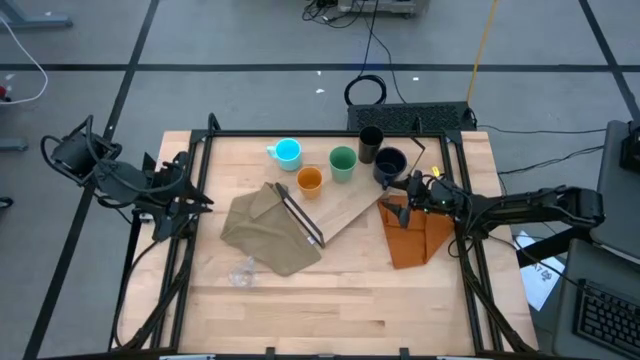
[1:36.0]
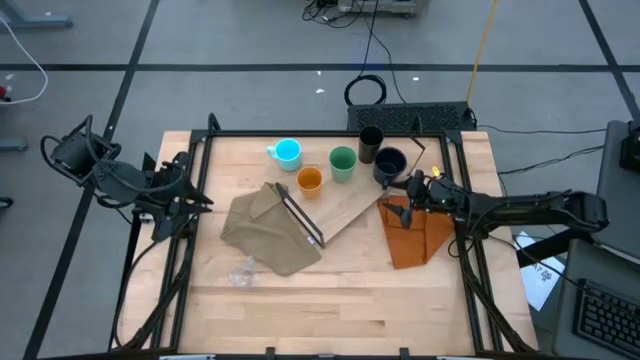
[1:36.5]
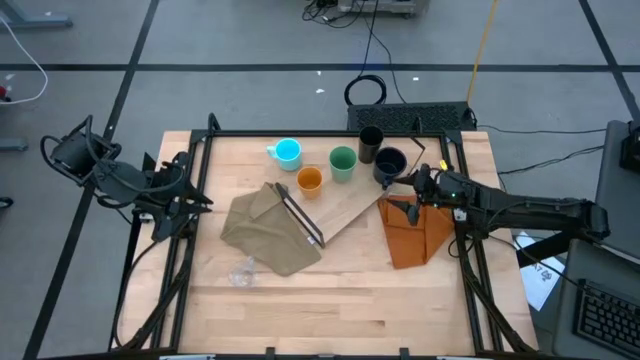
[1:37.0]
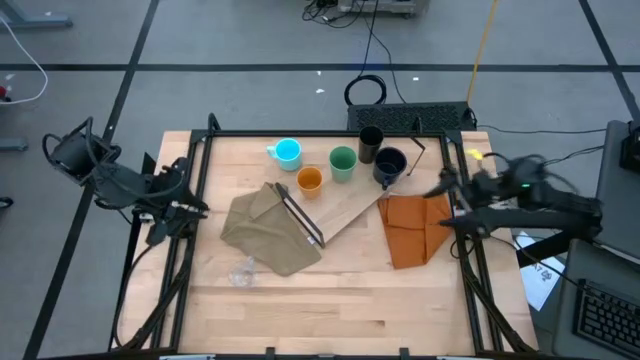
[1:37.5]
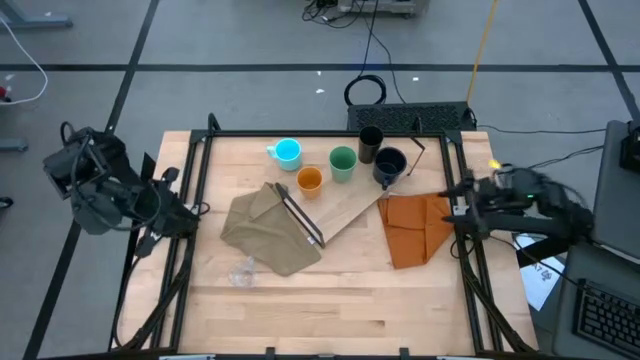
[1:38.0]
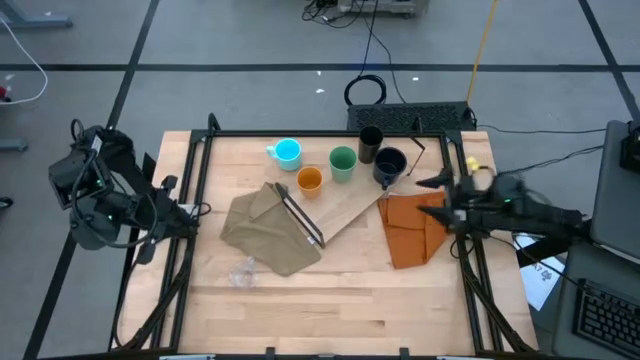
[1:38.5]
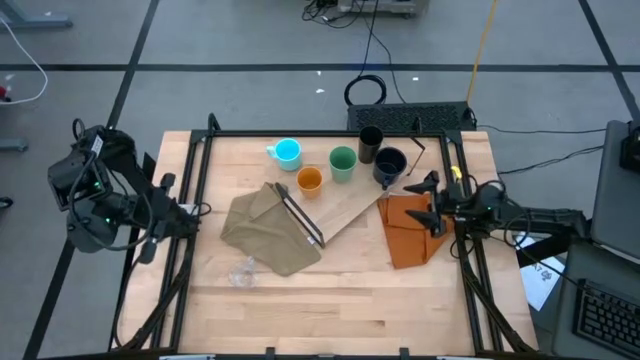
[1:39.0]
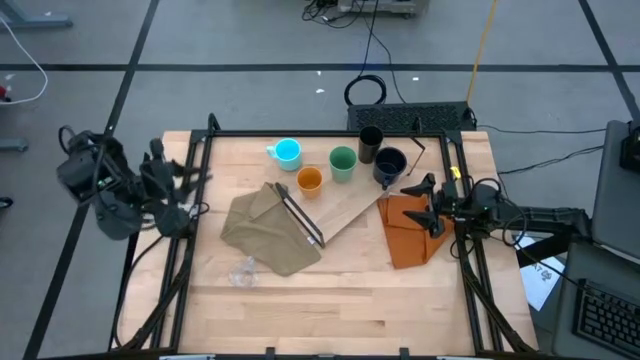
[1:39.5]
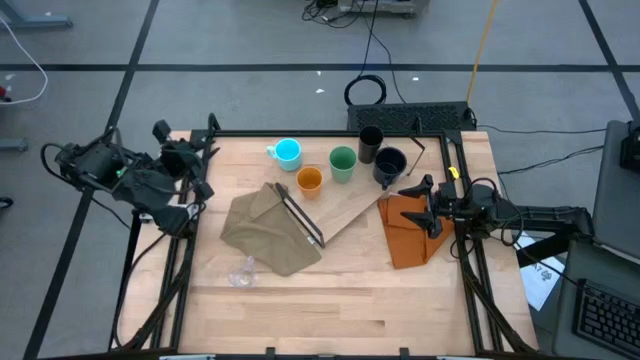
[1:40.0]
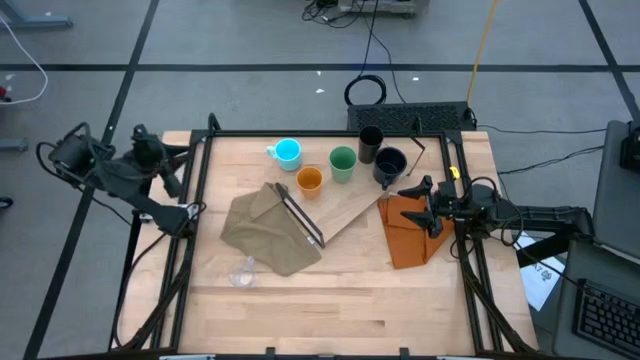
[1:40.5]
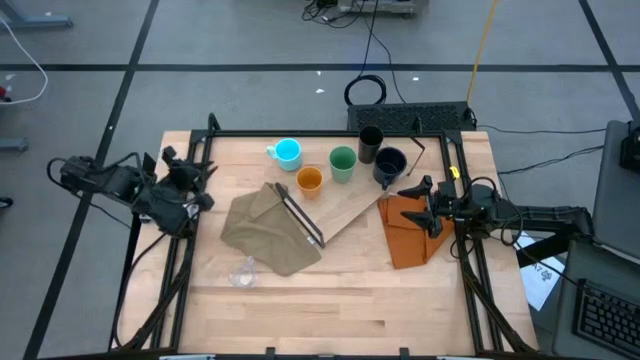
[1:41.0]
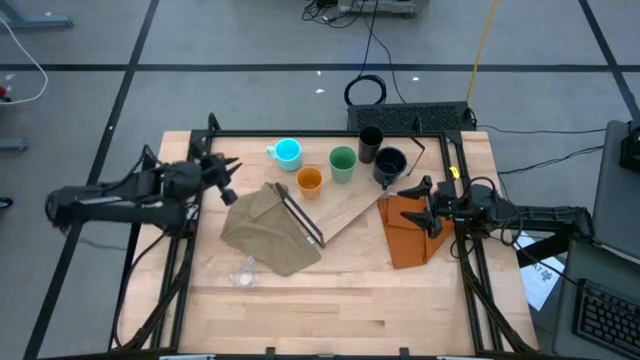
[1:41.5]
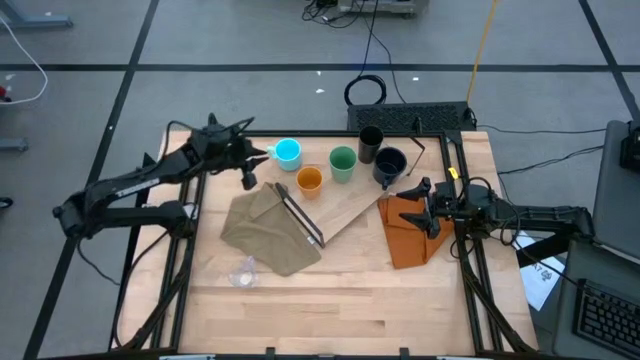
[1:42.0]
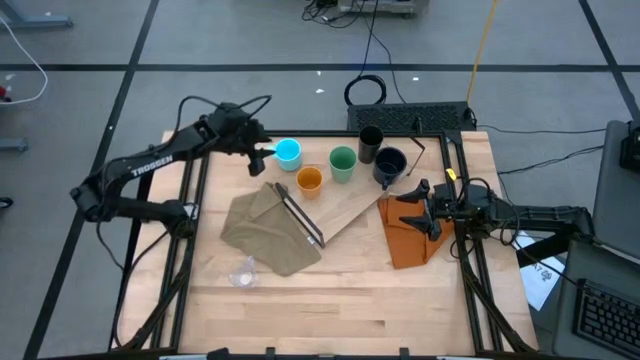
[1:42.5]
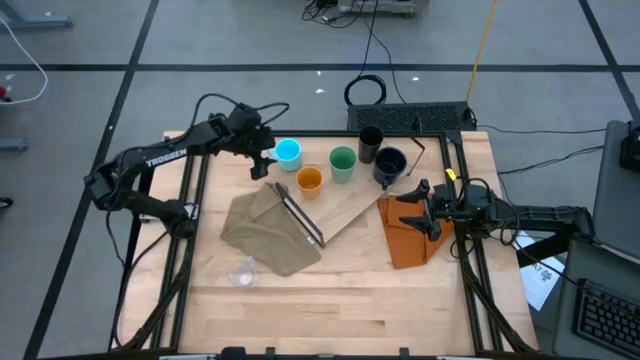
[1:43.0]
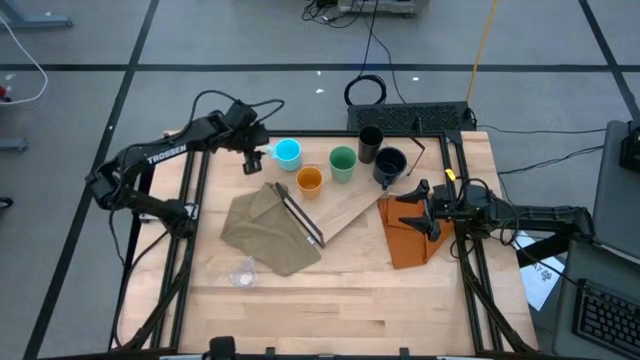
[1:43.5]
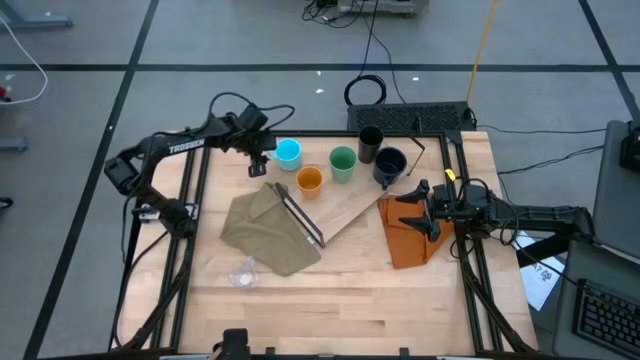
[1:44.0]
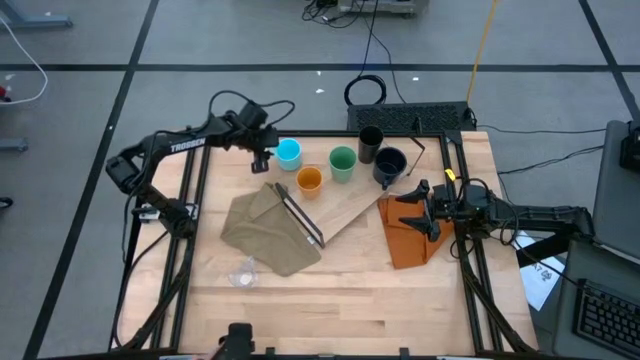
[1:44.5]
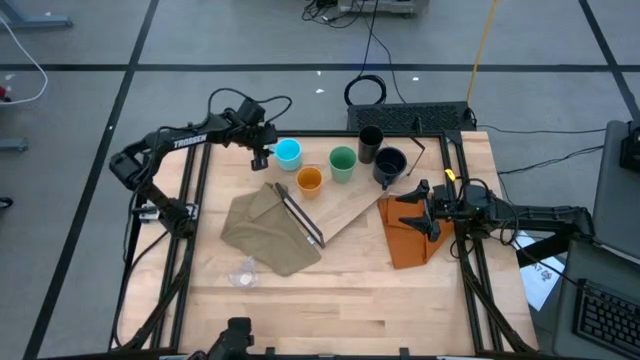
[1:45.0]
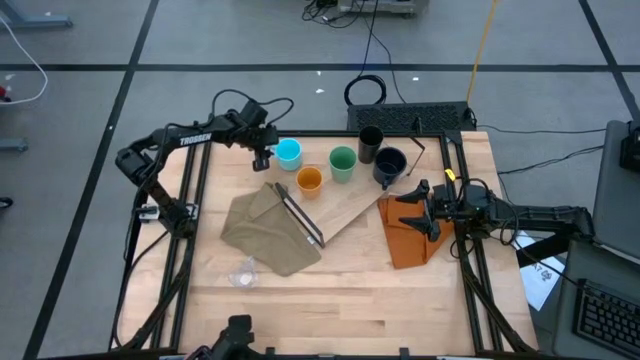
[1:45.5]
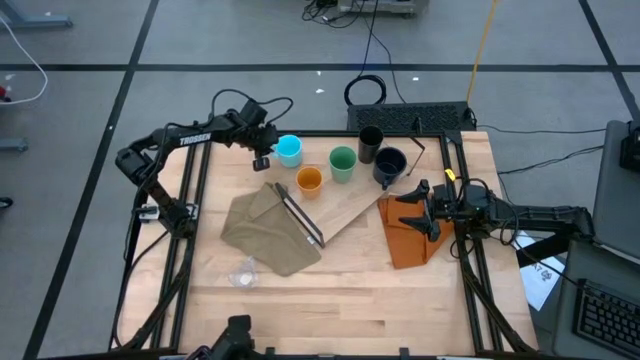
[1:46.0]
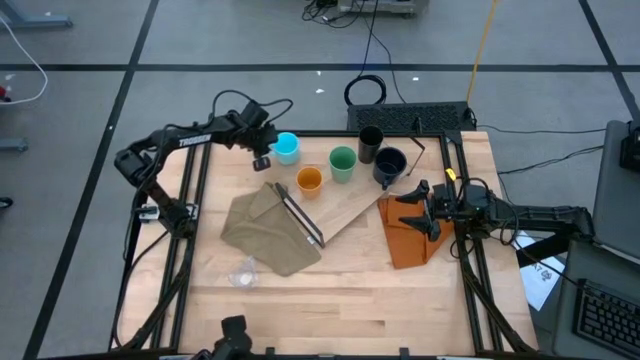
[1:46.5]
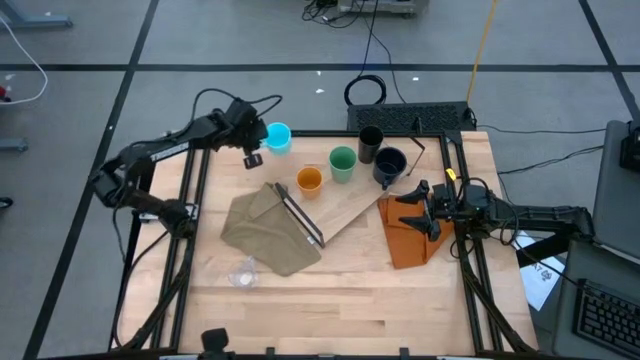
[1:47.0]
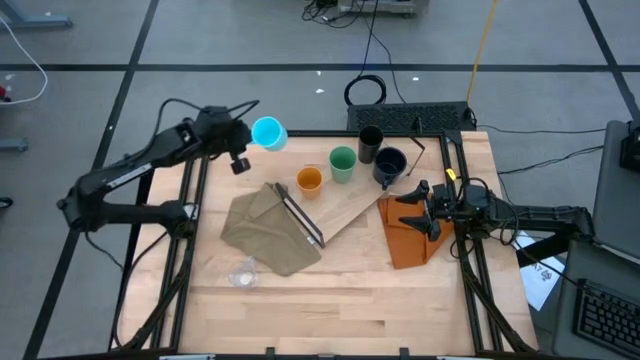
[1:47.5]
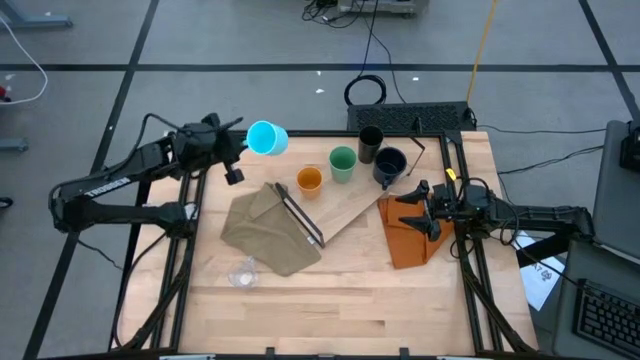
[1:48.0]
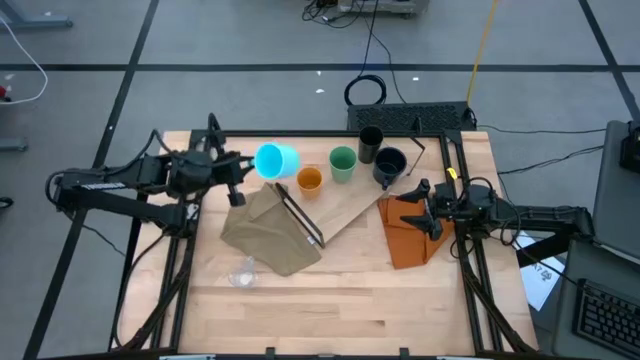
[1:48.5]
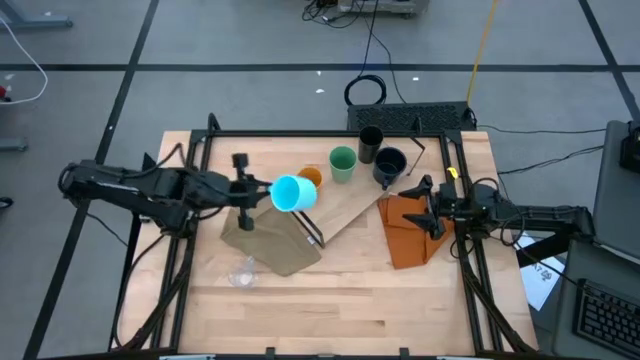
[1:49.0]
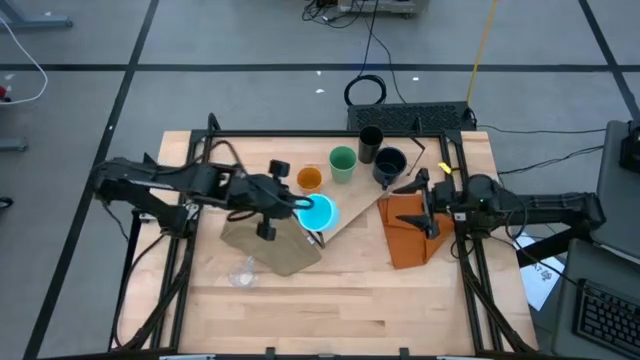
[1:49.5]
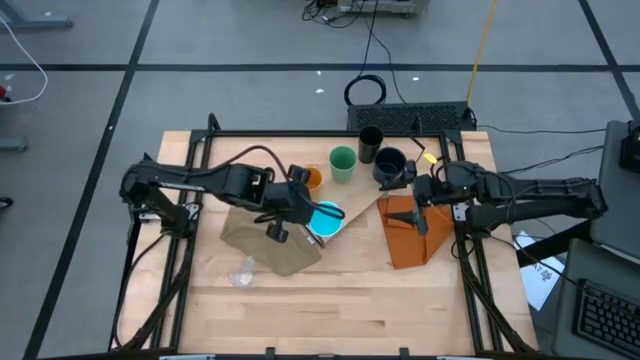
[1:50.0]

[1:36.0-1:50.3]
Task: Stack small to large cups/mugs on shelf
Put the light blue mug on the shelf

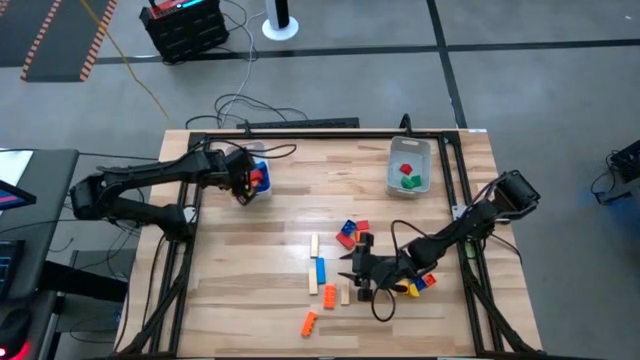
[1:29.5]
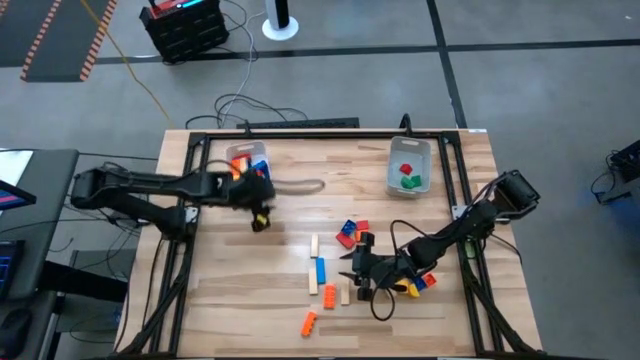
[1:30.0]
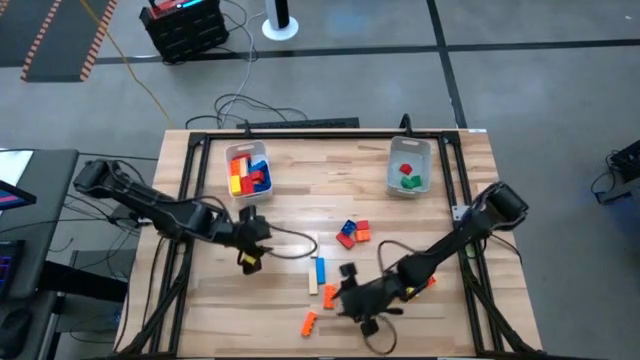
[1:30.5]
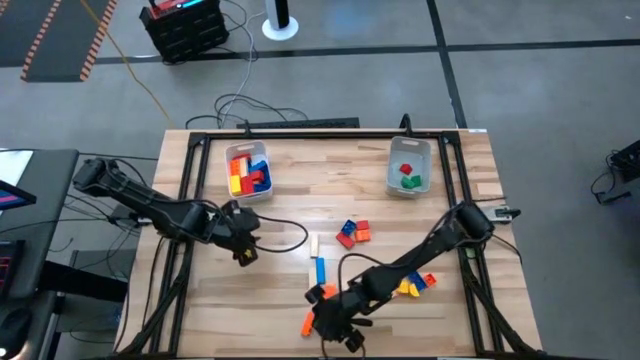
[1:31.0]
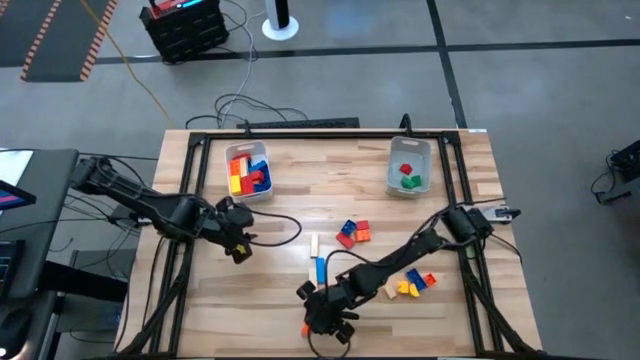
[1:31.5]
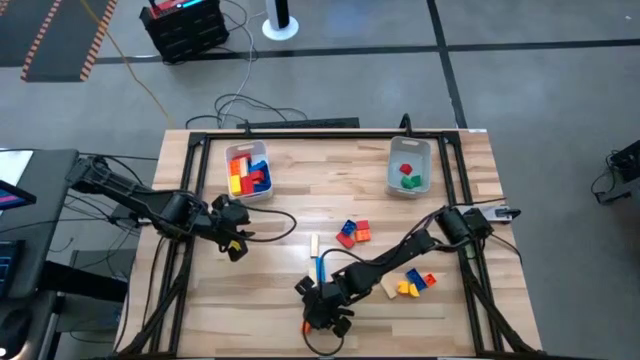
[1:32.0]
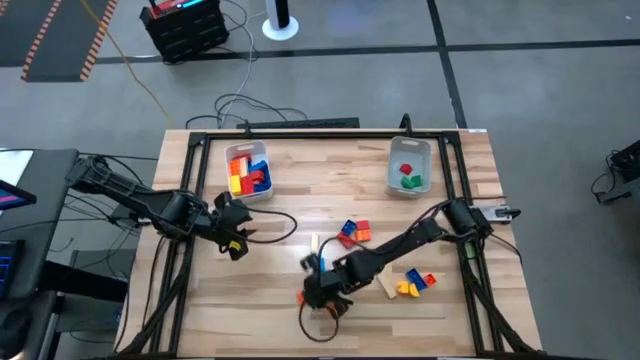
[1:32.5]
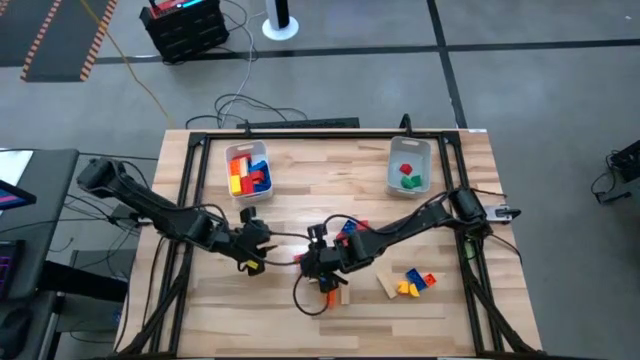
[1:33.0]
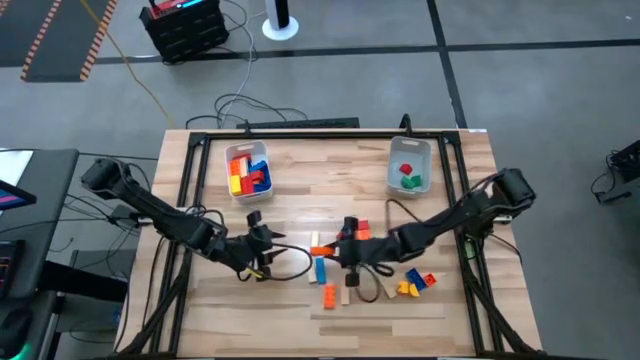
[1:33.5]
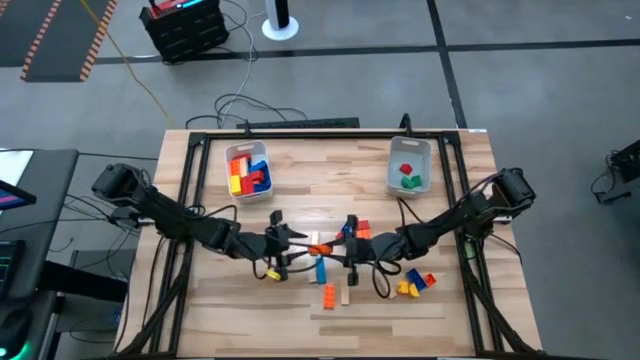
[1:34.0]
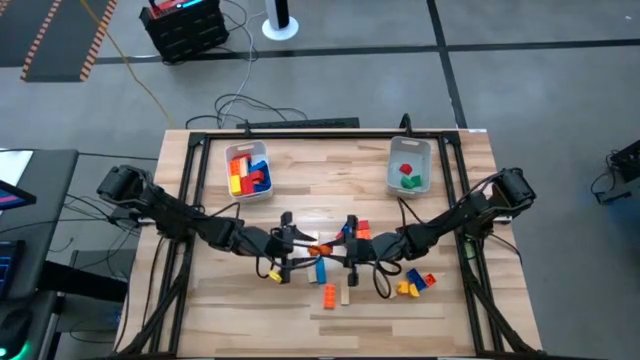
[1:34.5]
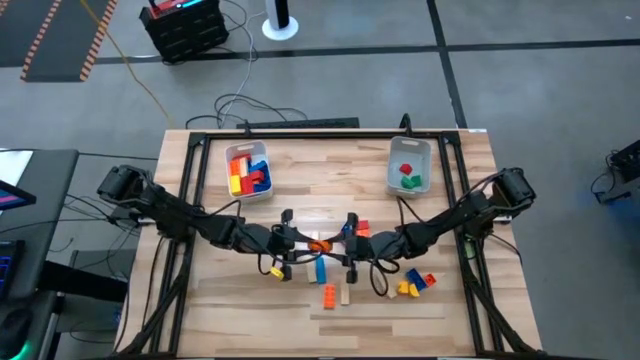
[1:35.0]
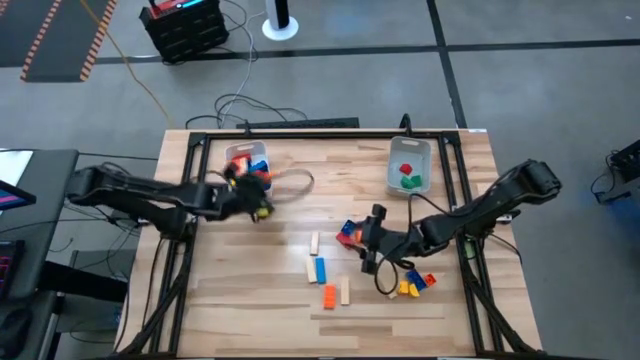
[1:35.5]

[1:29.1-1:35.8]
Task: Sort blocks by size
Put the large orange game piece into the white bin

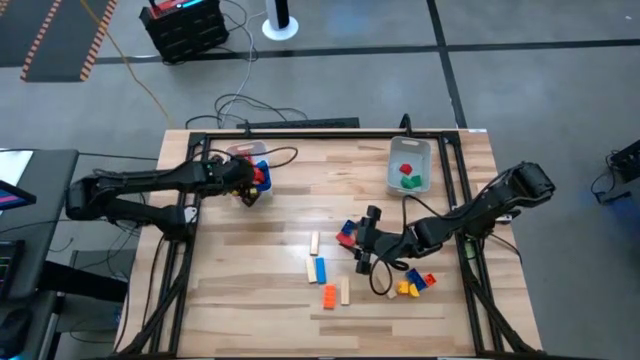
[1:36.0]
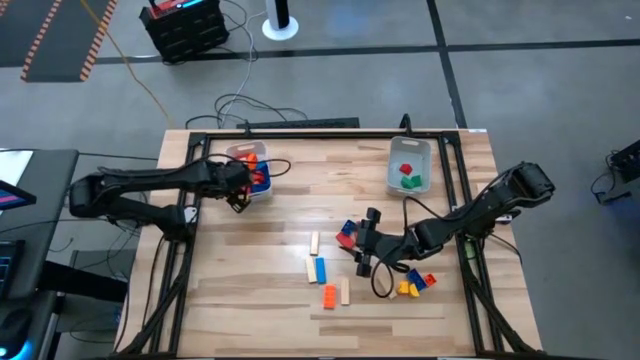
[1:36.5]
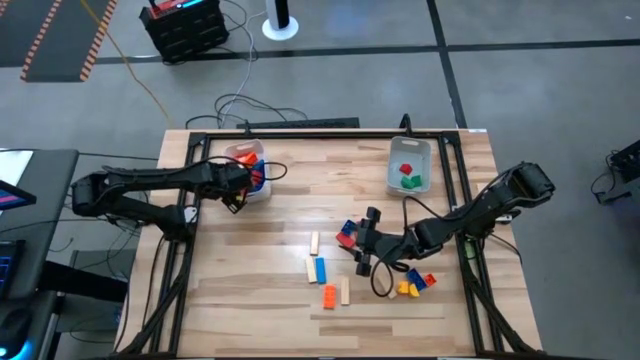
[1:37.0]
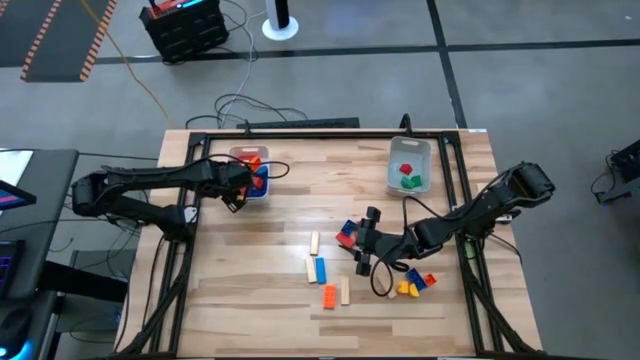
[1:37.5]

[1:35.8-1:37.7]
Adjust the white bin
